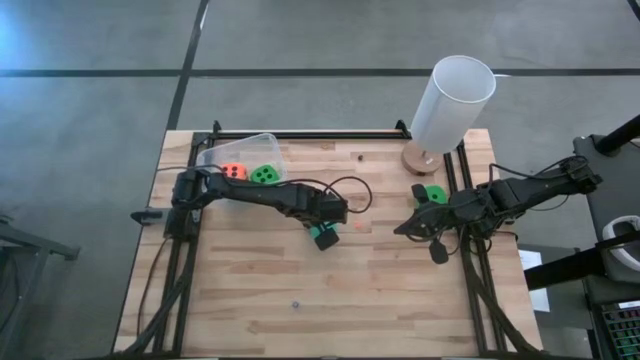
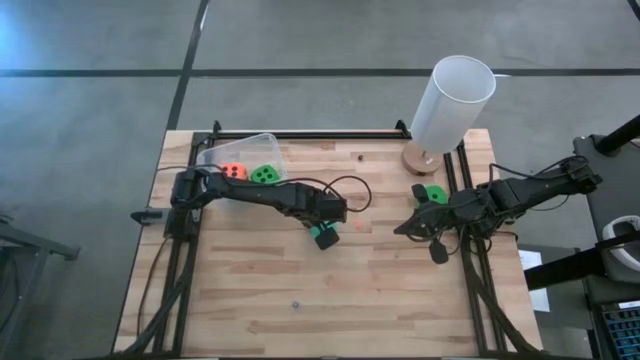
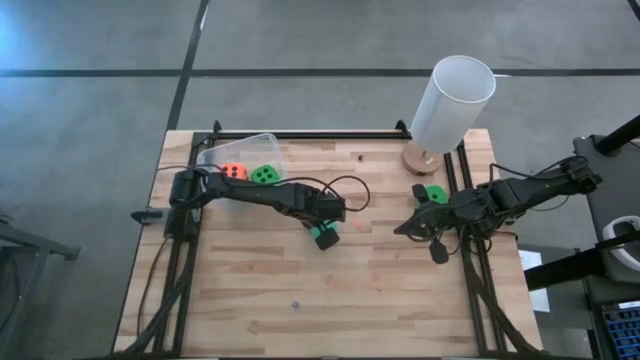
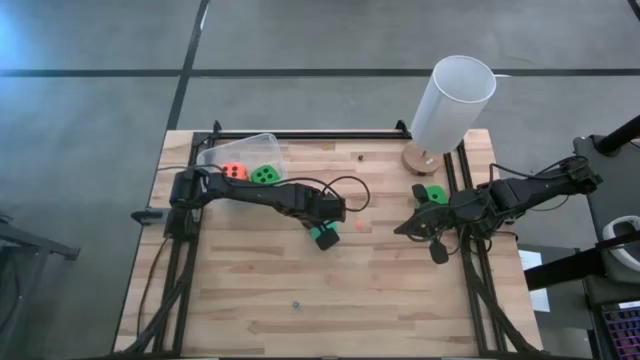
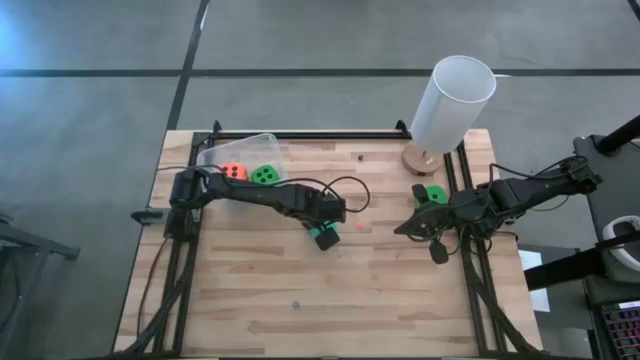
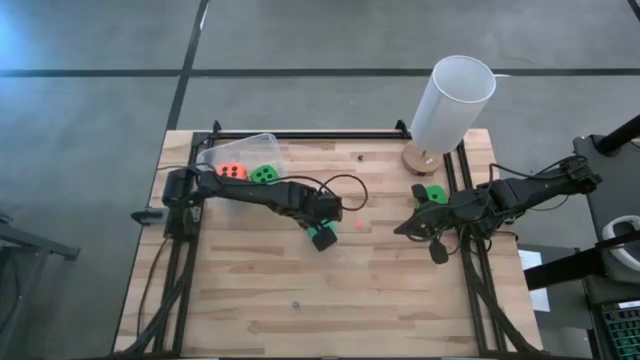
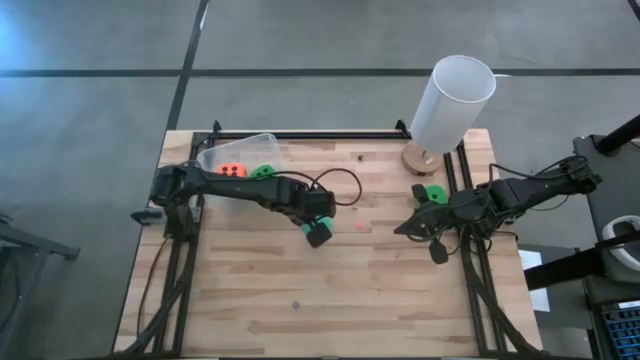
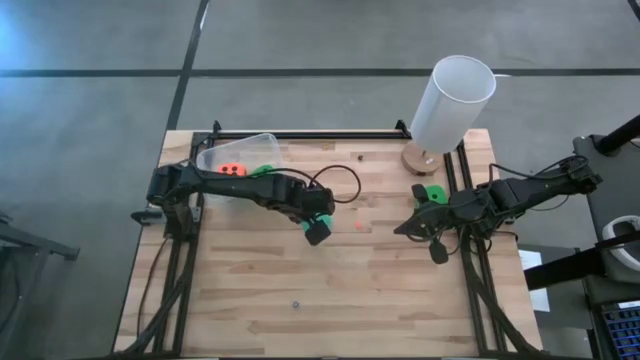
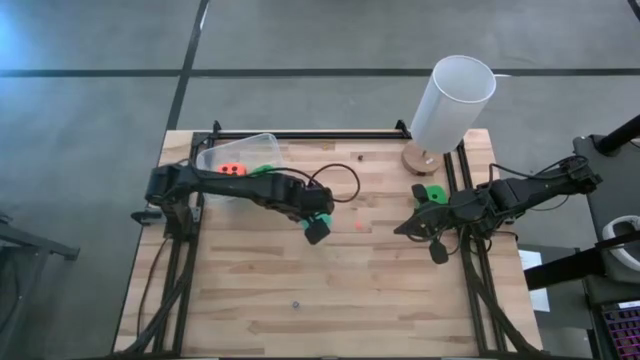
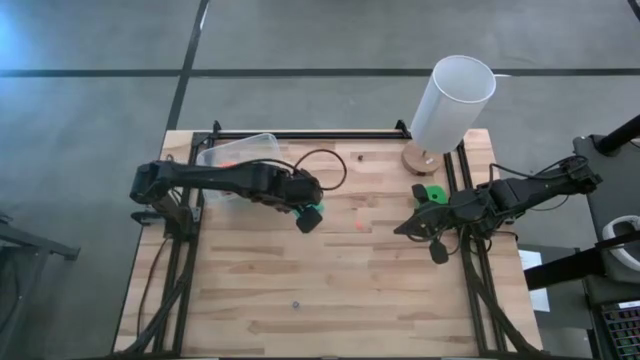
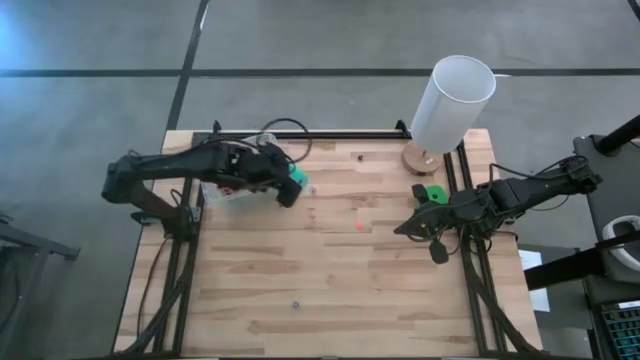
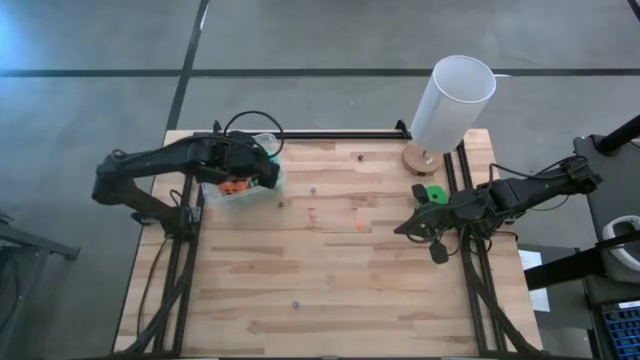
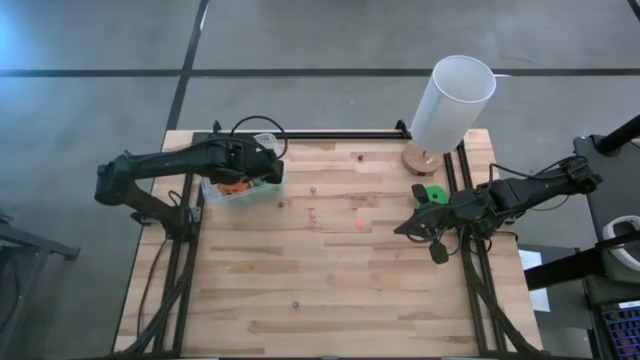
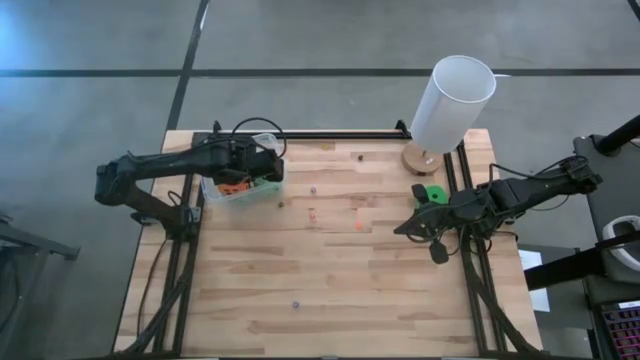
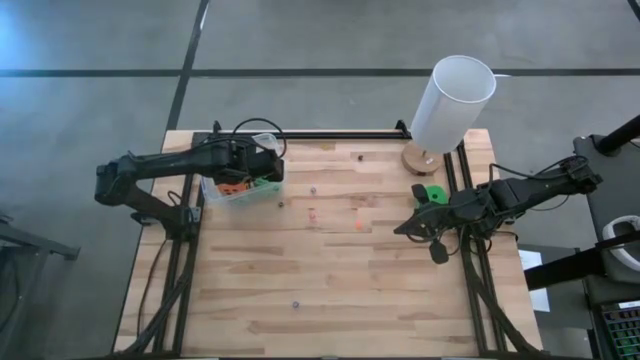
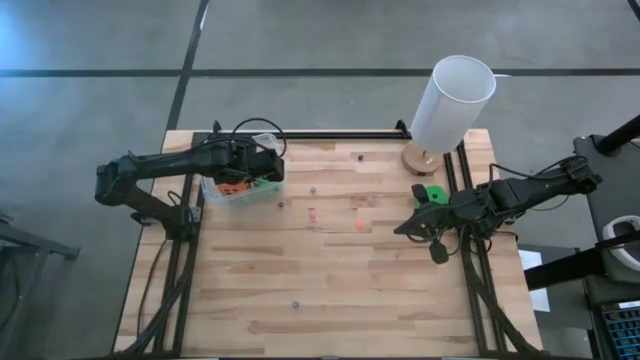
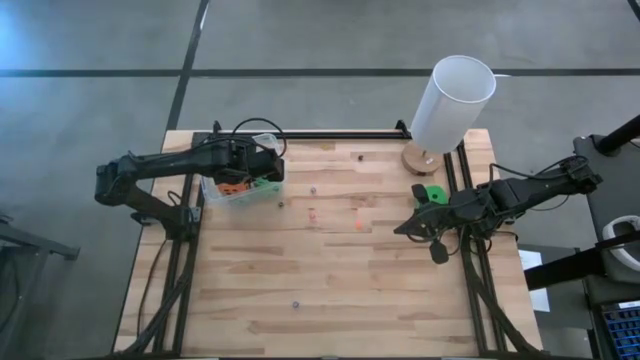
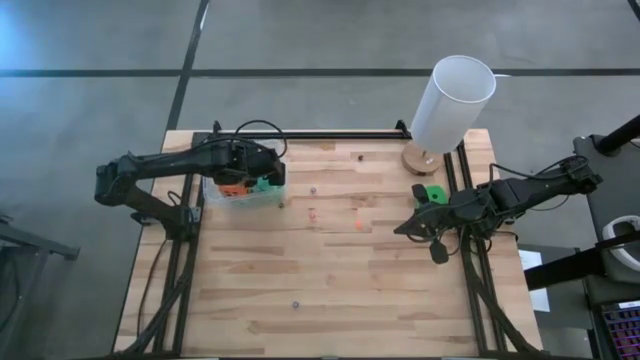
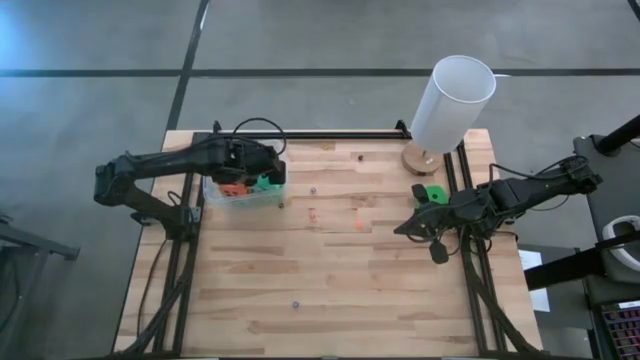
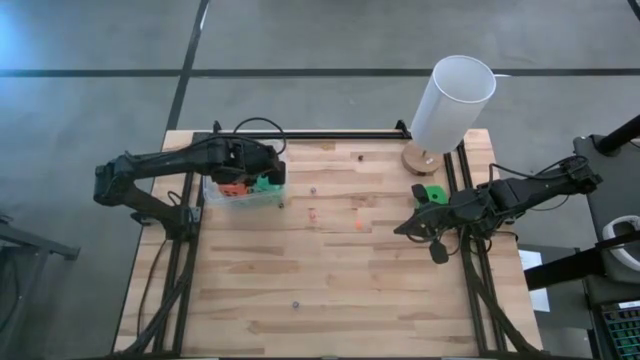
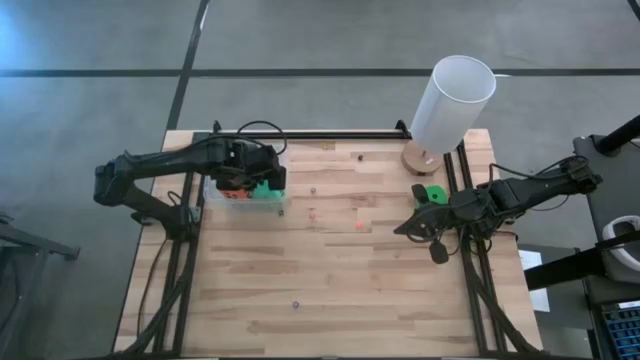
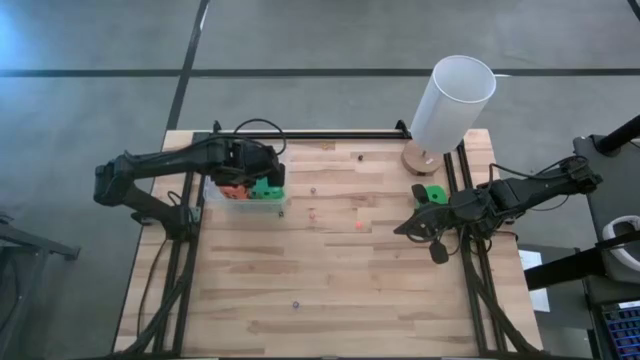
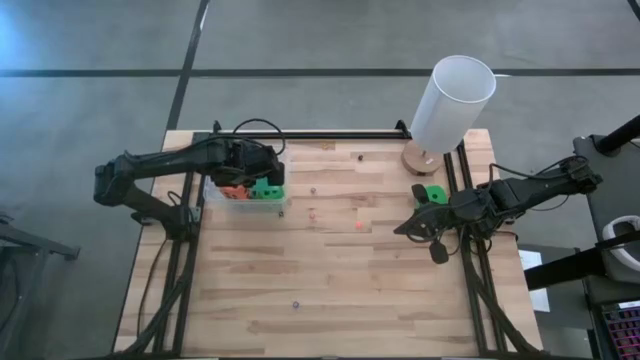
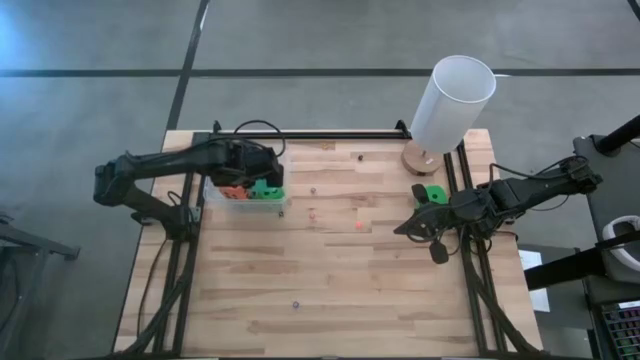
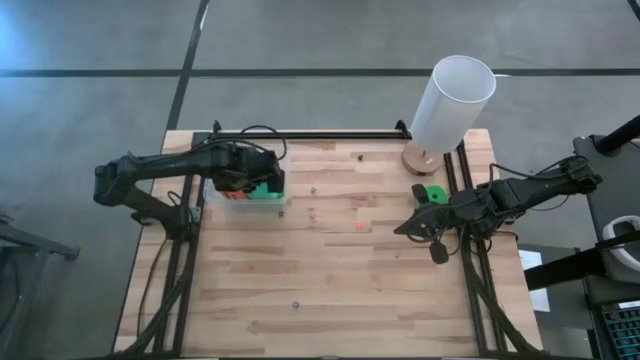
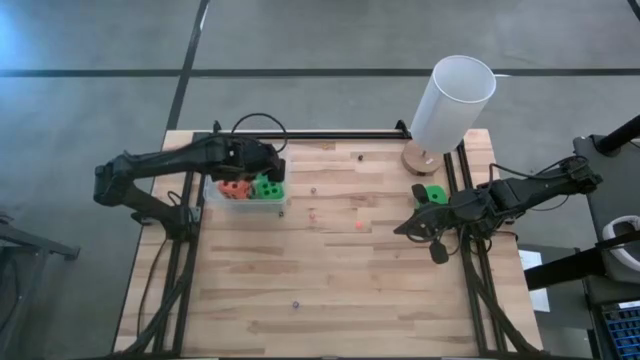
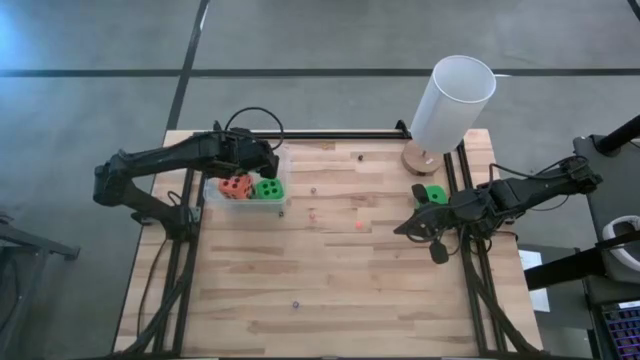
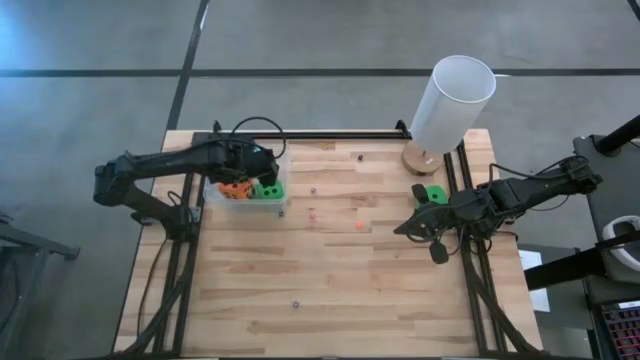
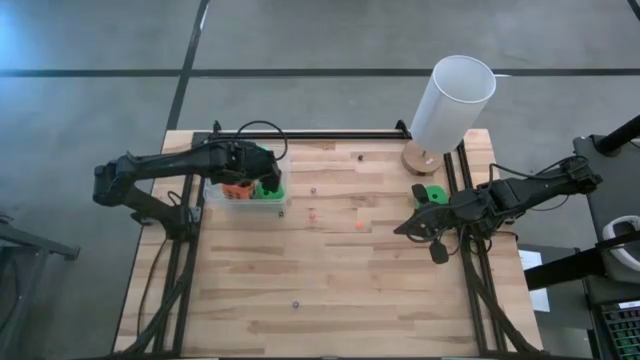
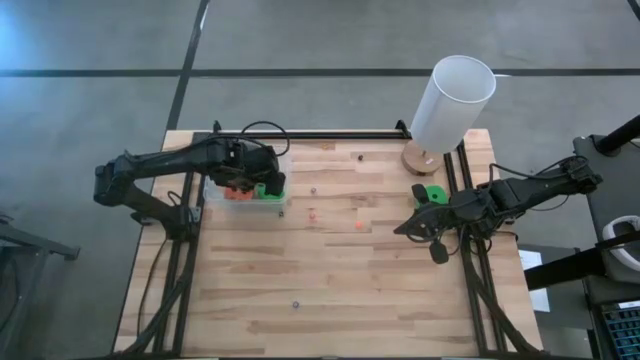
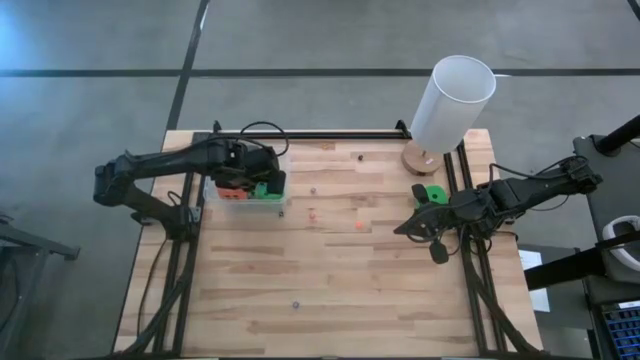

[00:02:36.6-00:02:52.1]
Task: Pick & Place Dice
Put the blue large dice into the transparent bin

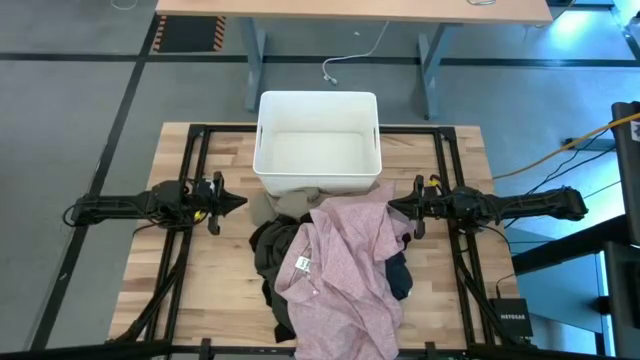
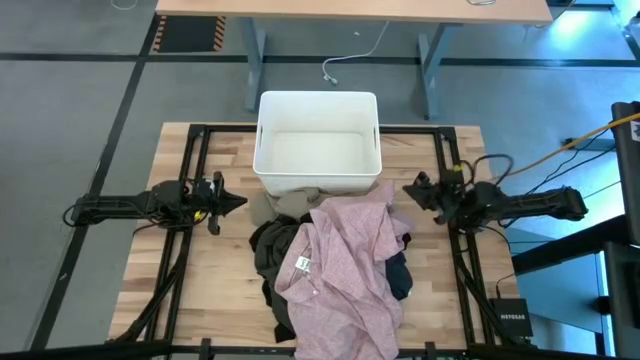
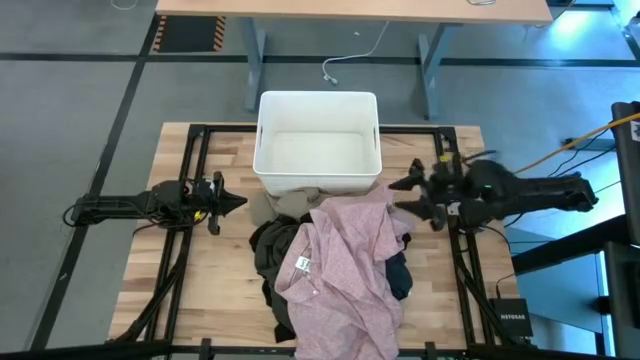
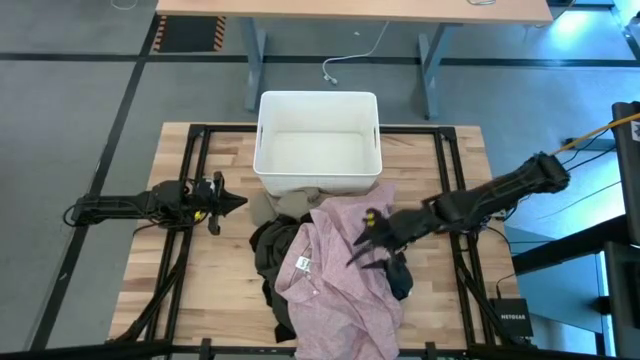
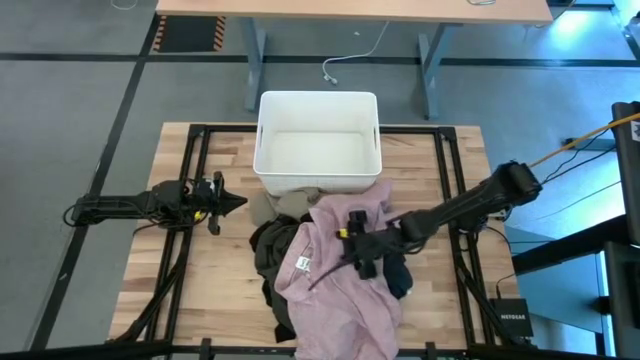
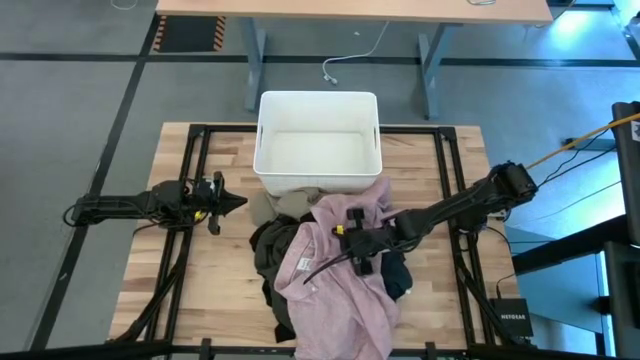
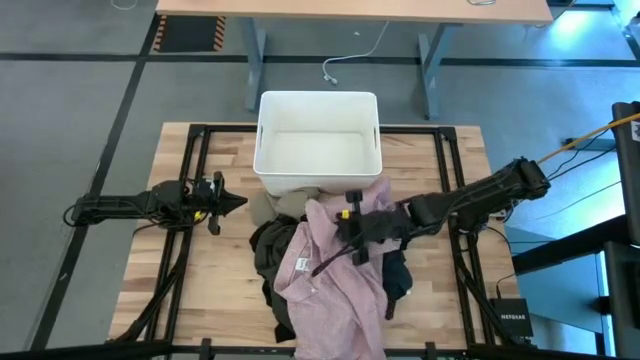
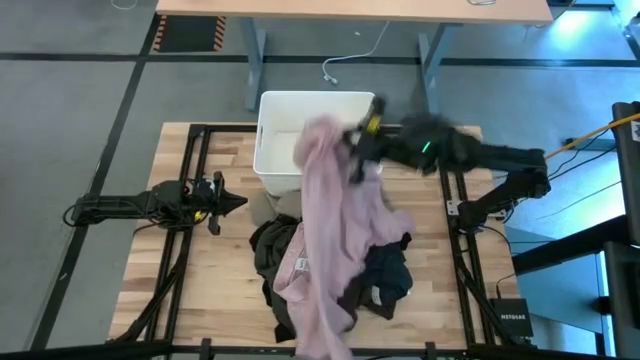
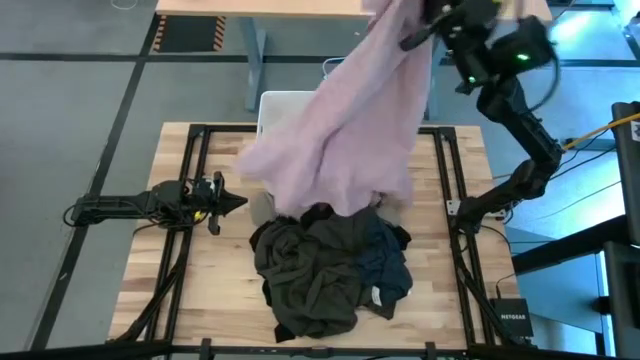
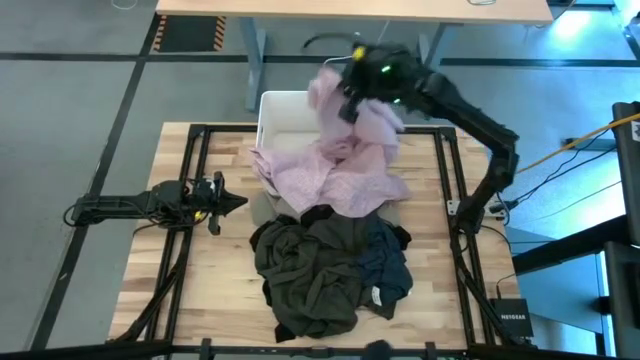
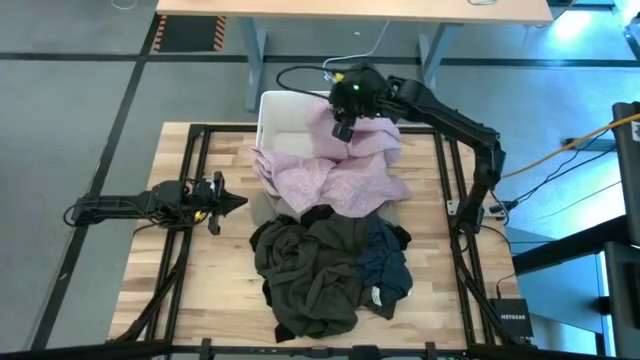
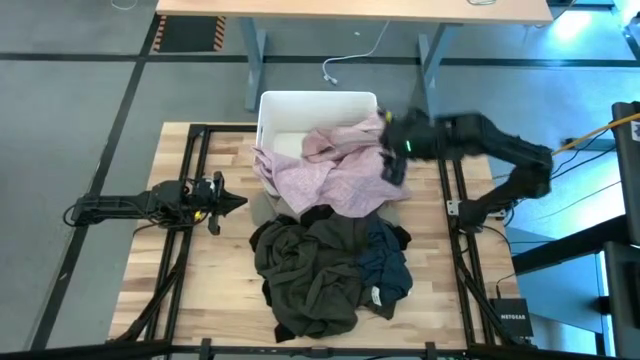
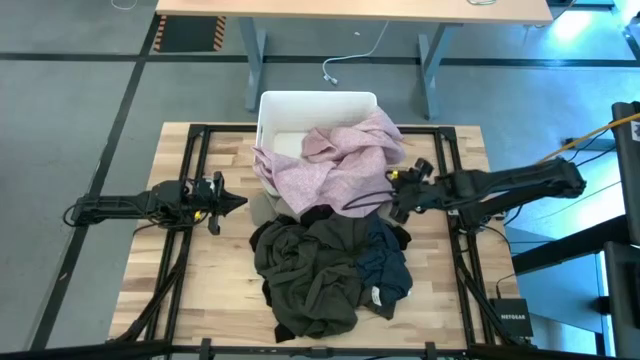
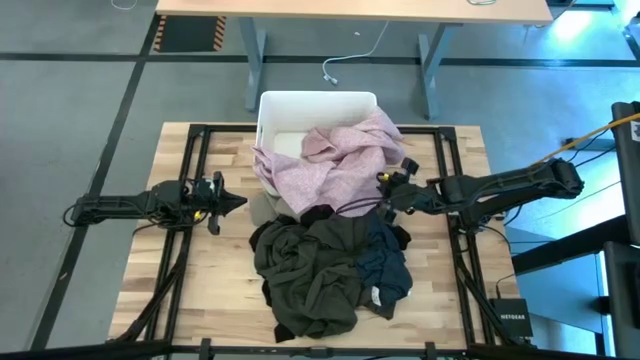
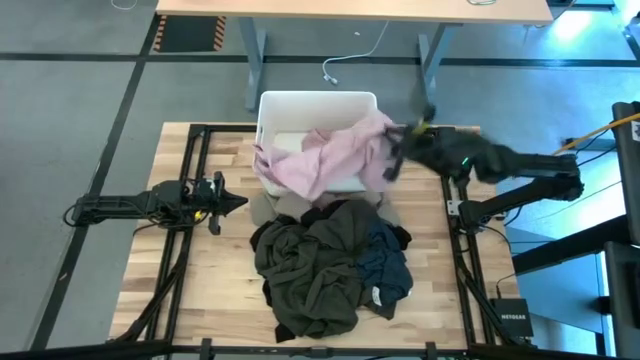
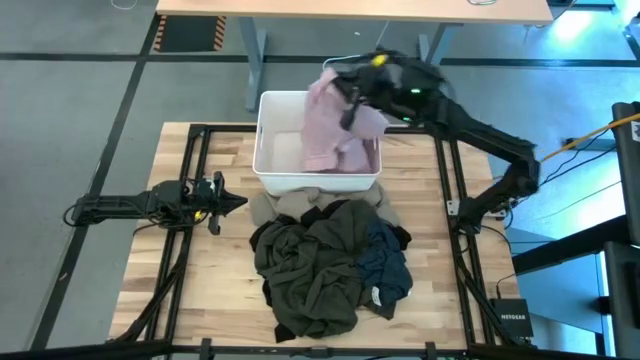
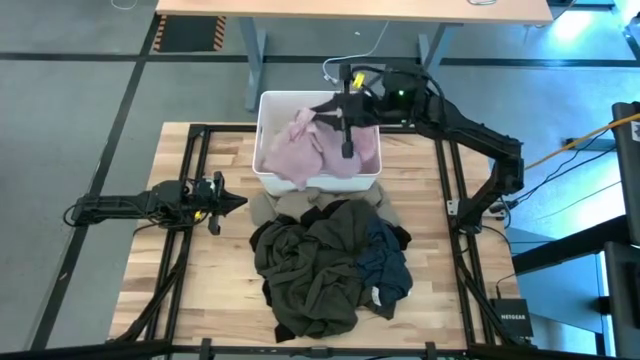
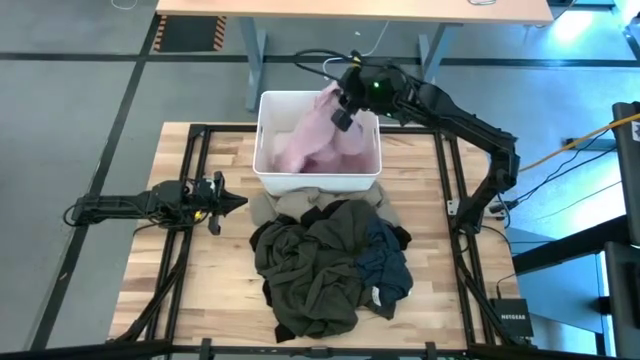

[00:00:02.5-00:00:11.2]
Task: Sort clothes
Put the pink polo shirt into the white bin
